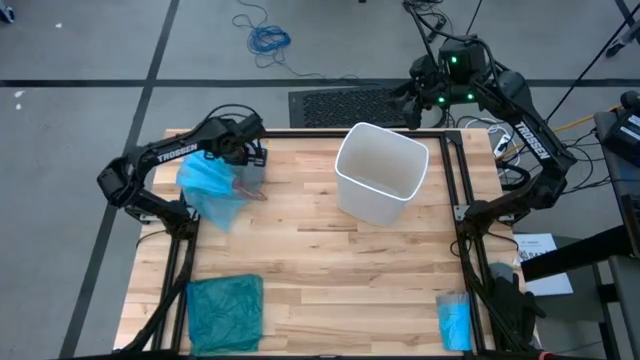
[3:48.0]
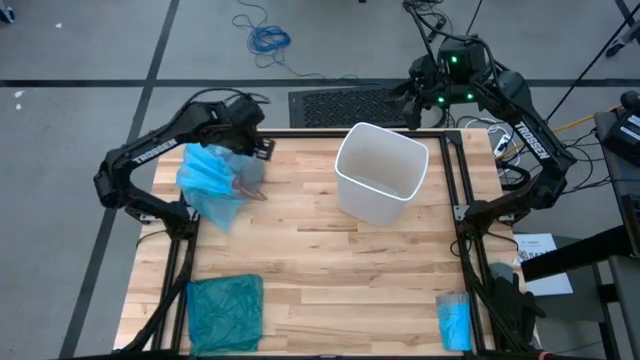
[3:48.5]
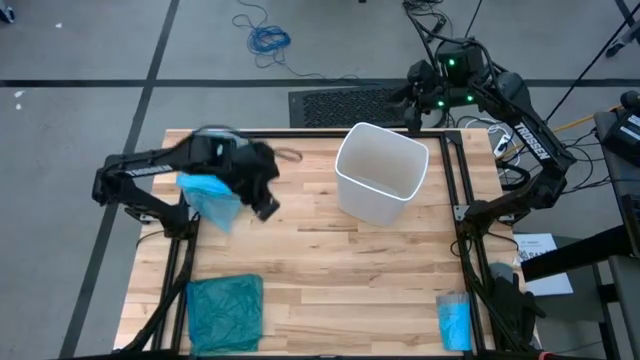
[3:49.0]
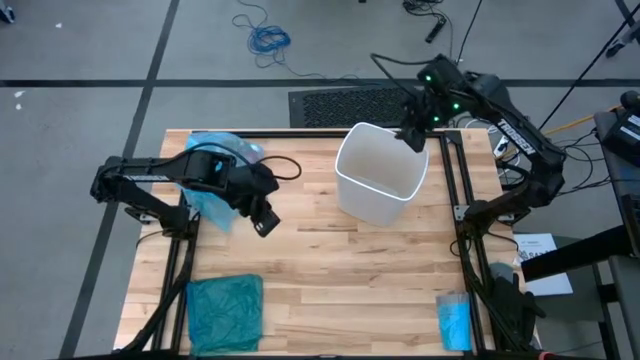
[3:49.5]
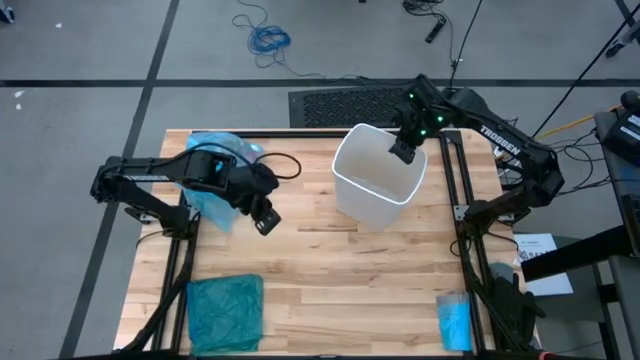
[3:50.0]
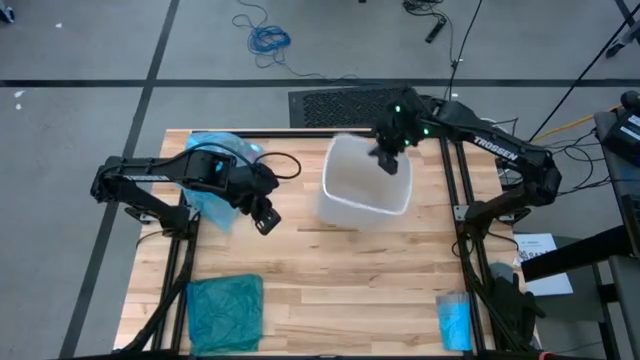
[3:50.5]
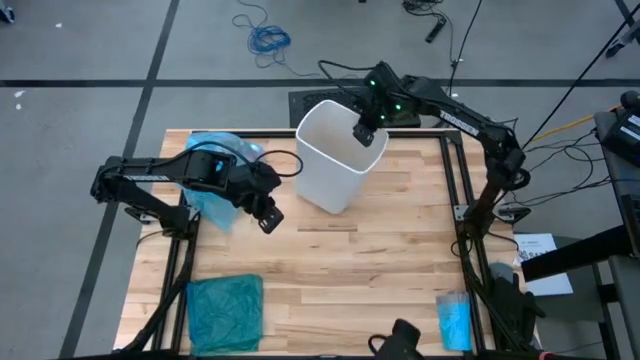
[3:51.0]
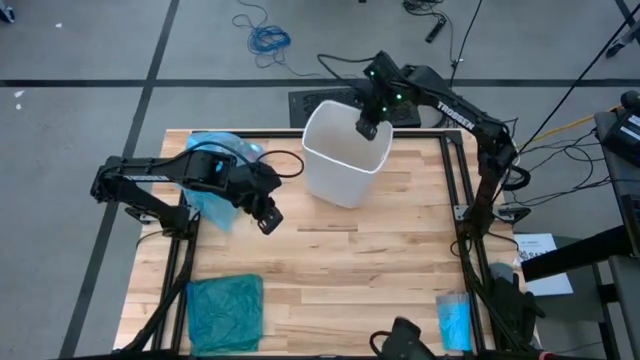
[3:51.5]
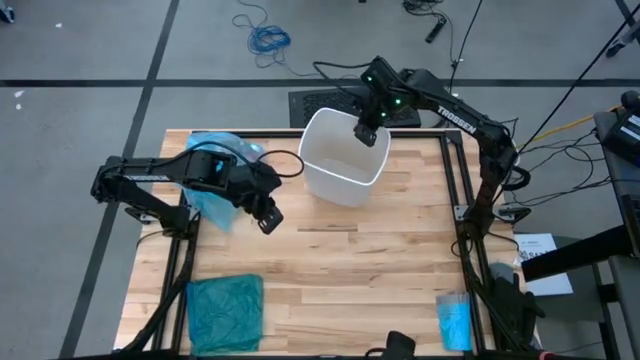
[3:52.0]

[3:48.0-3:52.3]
Task: place trash/remove bag and relplace
Adjust the white trash bin to the top center of the table

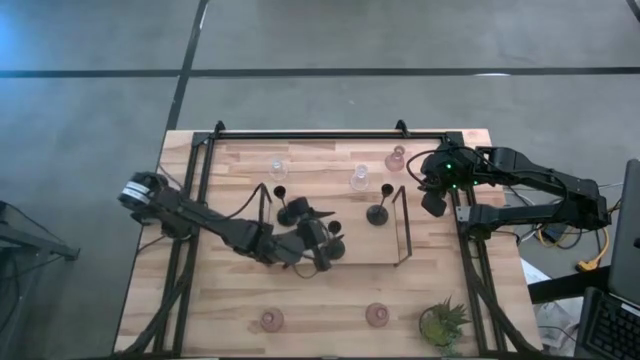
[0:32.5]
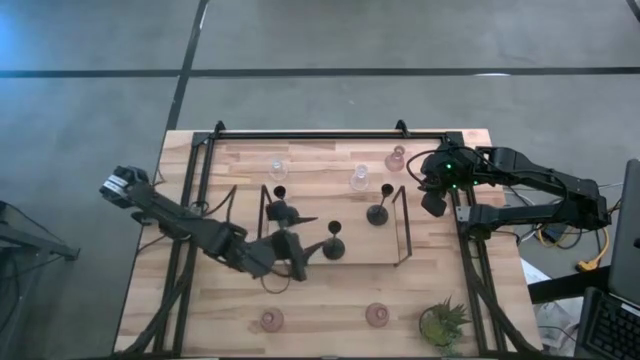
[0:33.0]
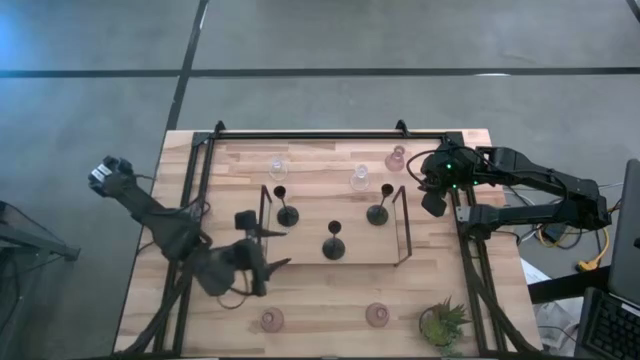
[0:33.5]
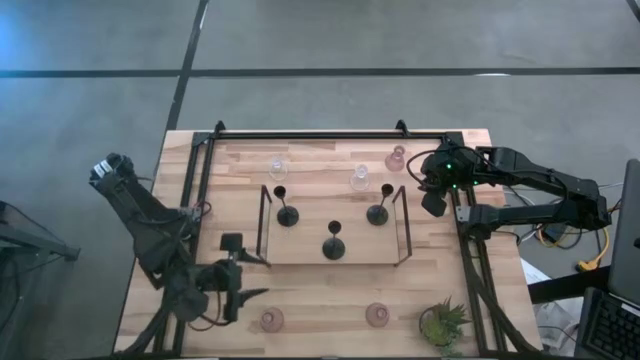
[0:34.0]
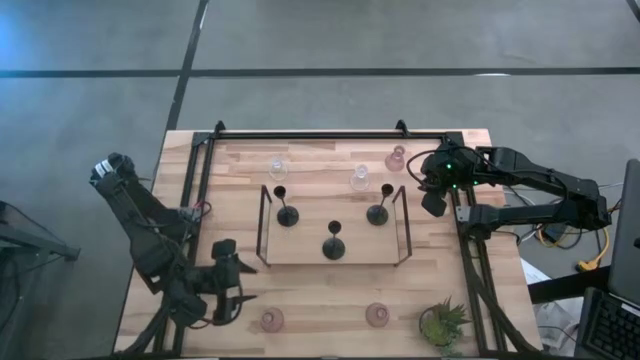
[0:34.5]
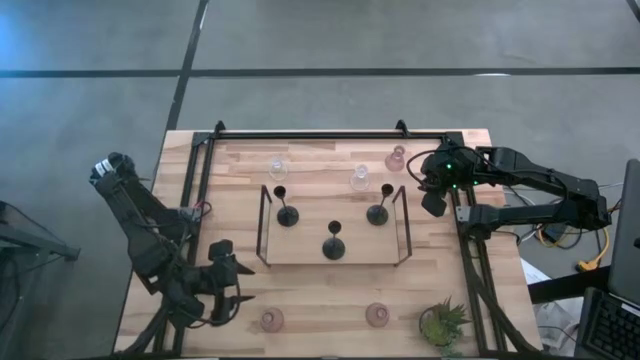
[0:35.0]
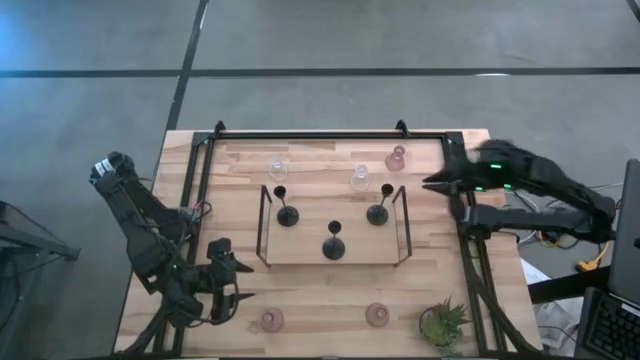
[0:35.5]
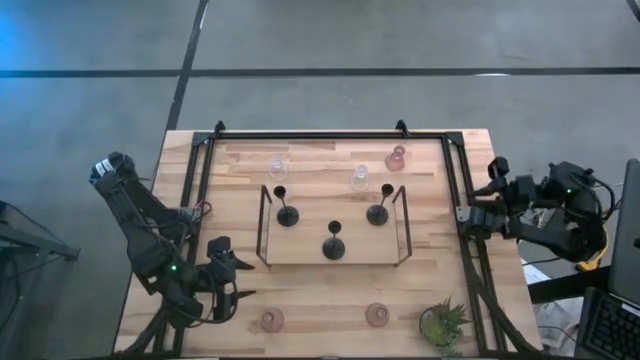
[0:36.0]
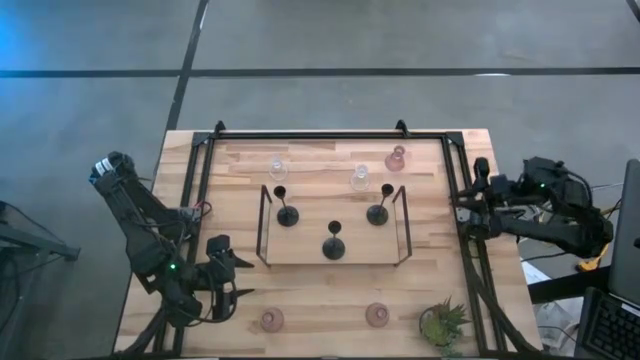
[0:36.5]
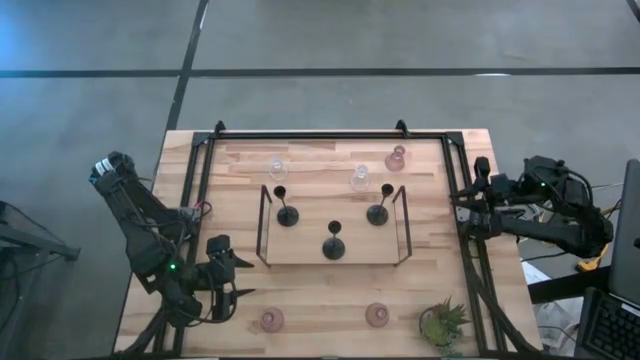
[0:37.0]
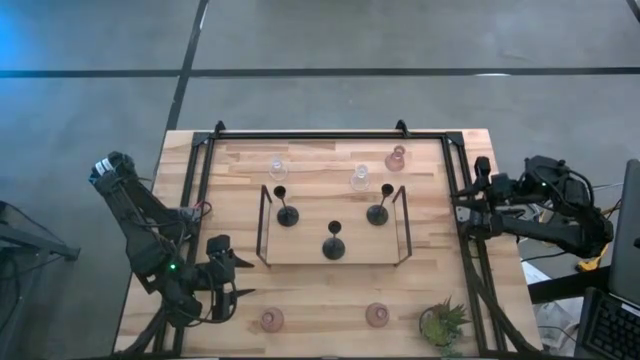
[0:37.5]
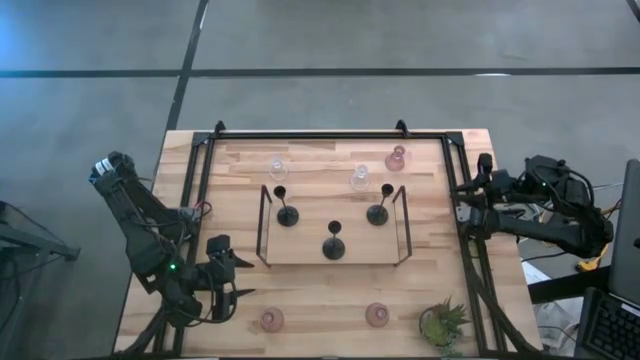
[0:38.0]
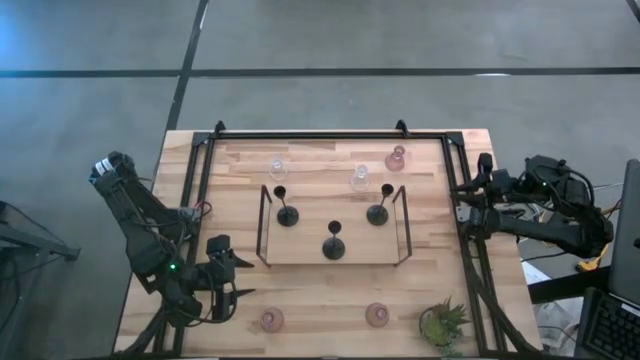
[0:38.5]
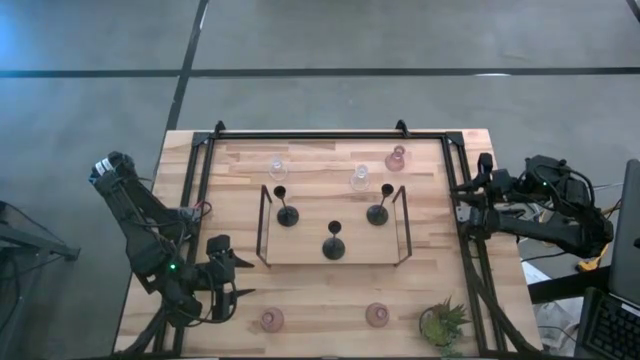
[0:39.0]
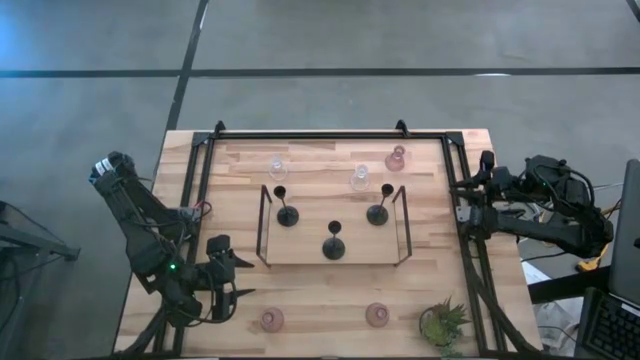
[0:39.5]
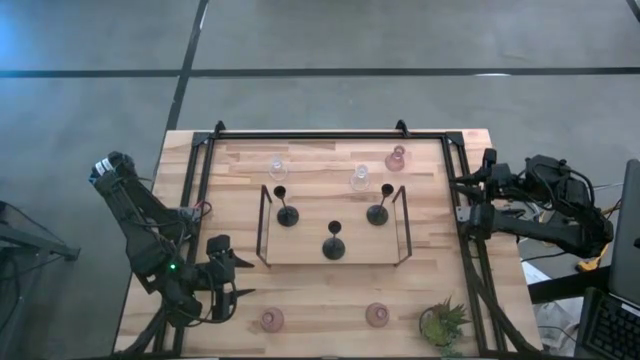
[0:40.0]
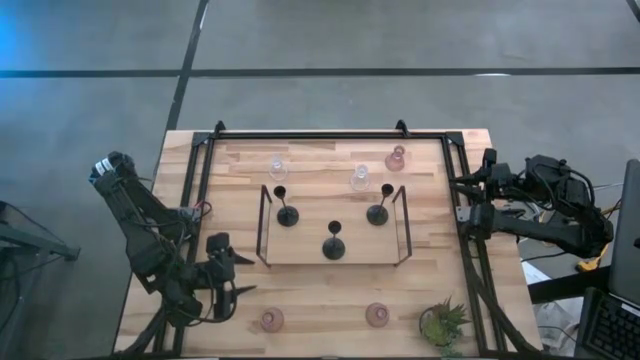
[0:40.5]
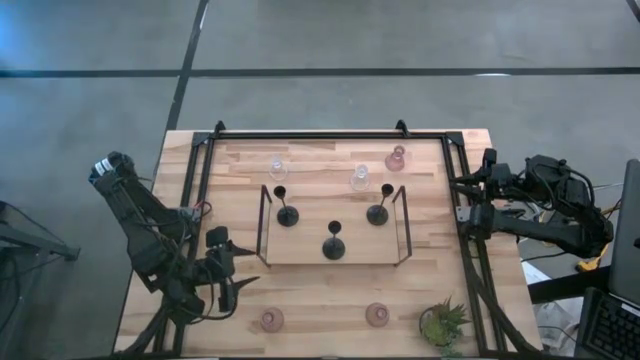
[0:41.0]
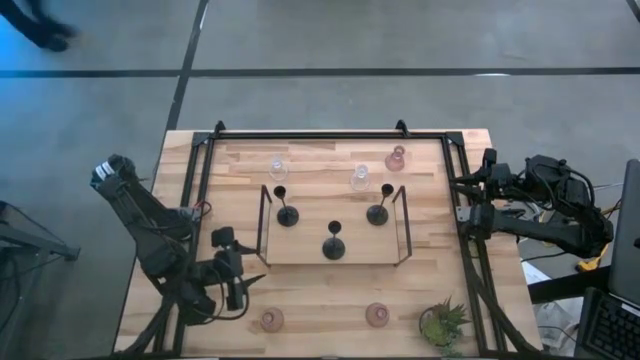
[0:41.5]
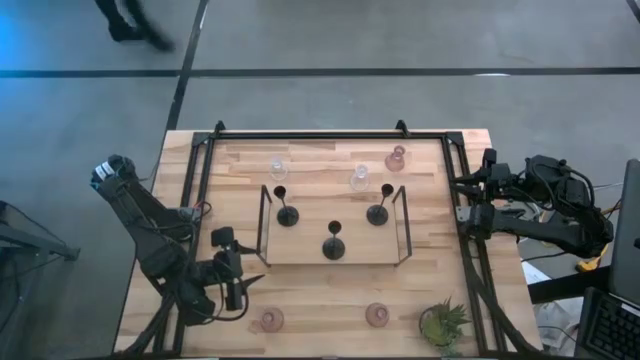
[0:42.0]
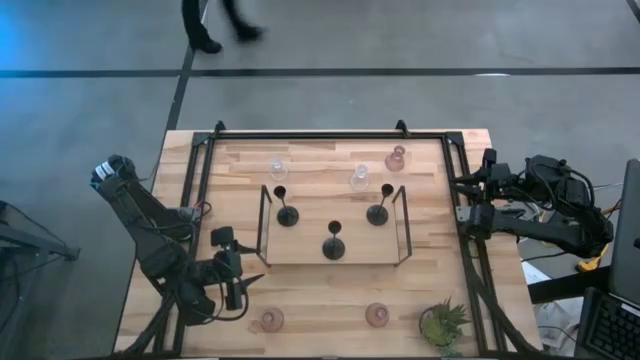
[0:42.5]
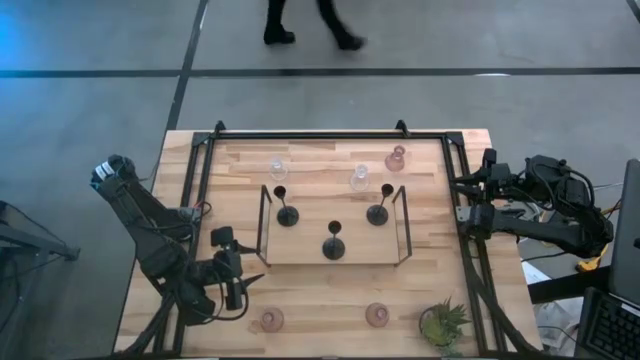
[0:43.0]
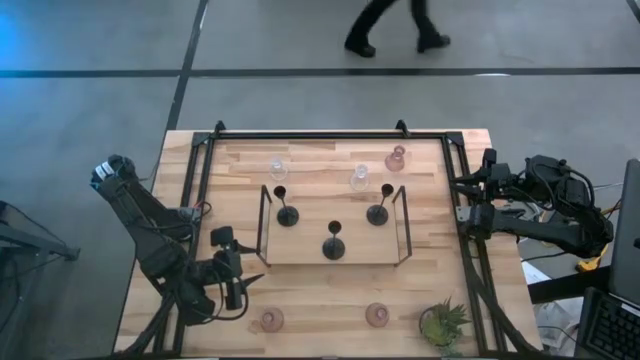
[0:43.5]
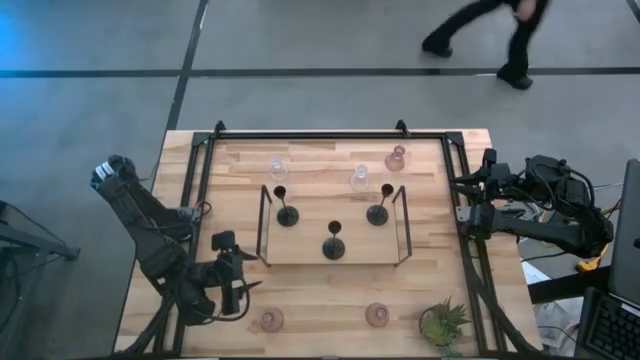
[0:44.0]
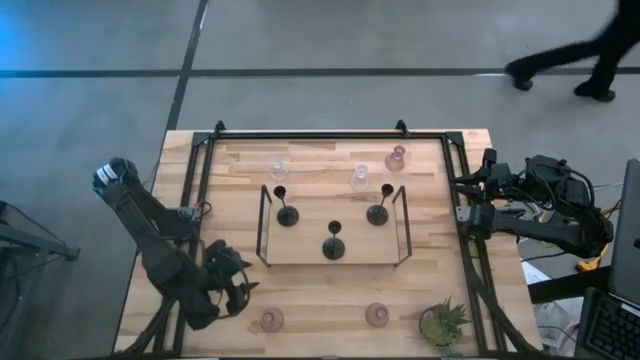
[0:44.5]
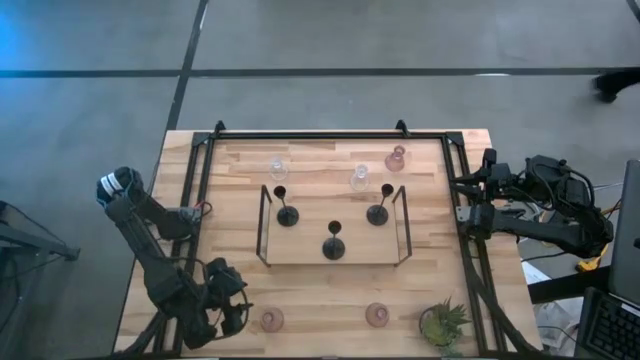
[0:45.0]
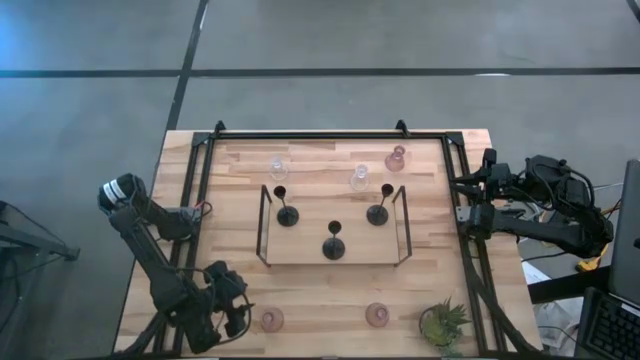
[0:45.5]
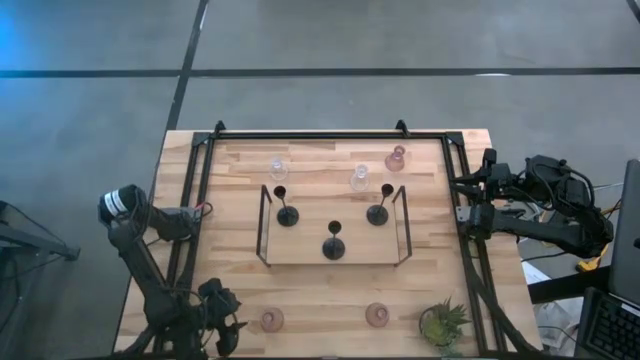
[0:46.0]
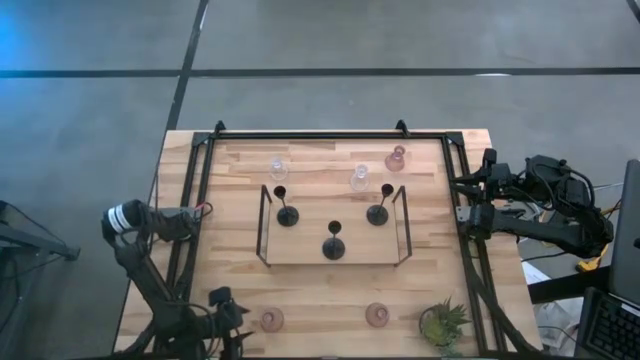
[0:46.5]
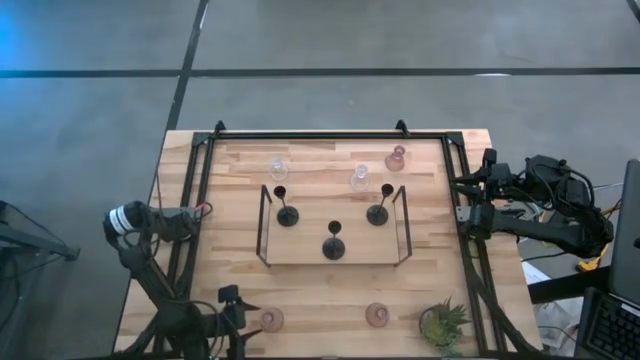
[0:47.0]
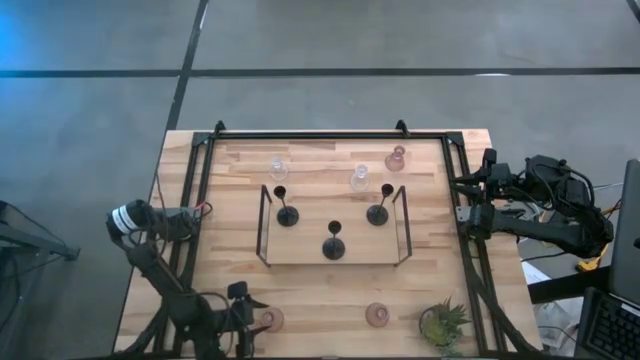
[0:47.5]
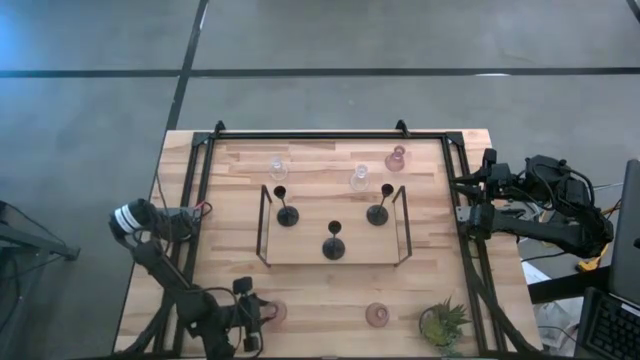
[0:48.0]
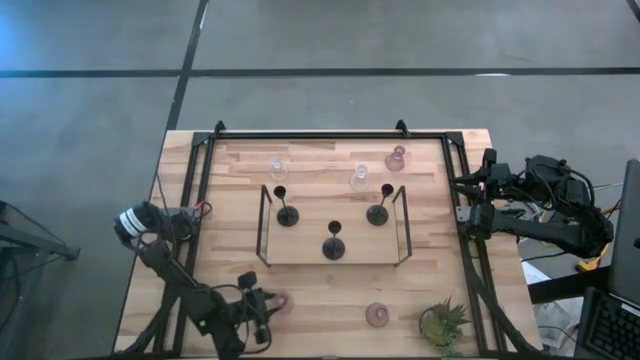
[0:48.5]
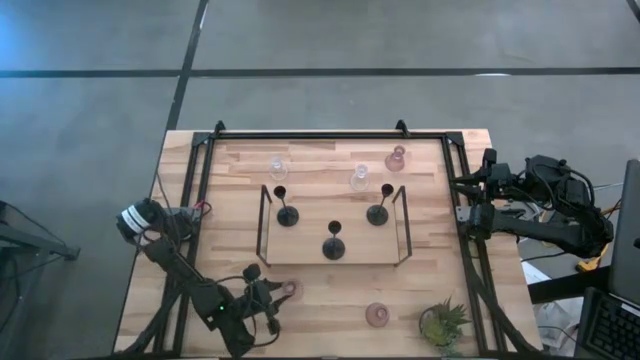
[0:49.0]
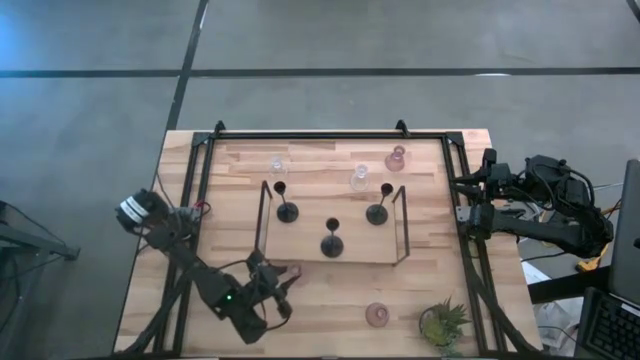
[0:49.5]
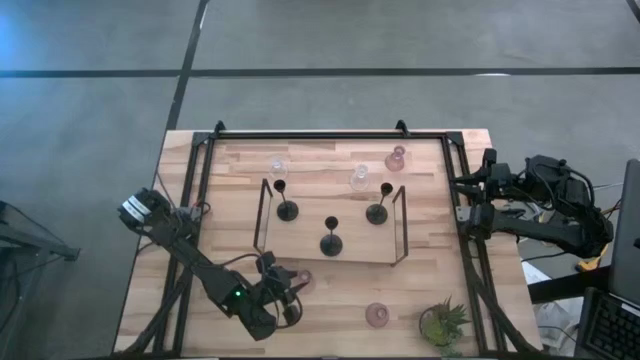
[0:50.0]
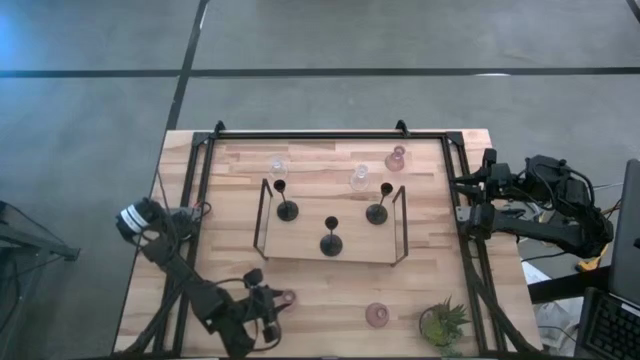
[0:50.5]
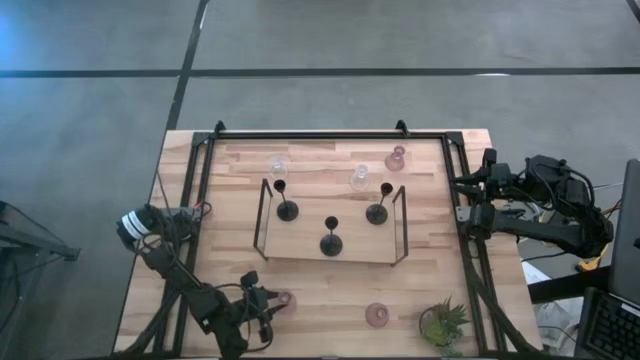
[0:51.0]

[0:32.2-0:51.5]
Task: Pick & Place candle stick holders
Put the bottom left pink glass candle holder
